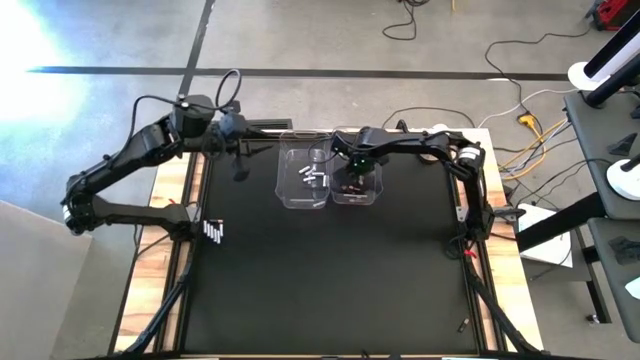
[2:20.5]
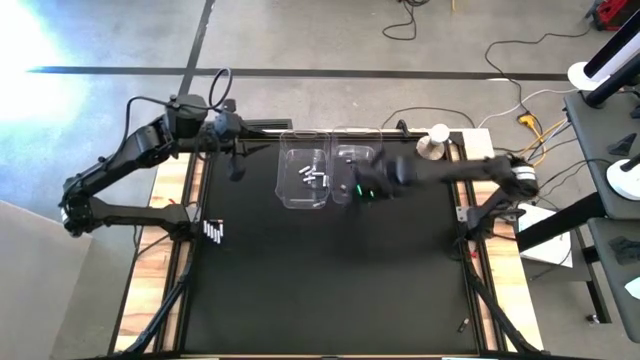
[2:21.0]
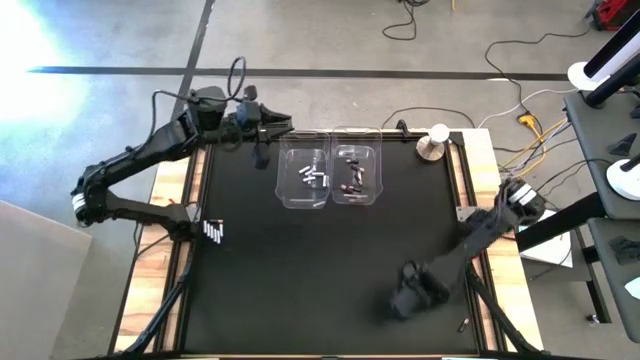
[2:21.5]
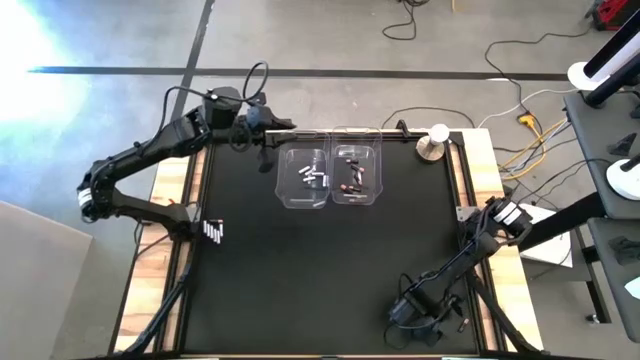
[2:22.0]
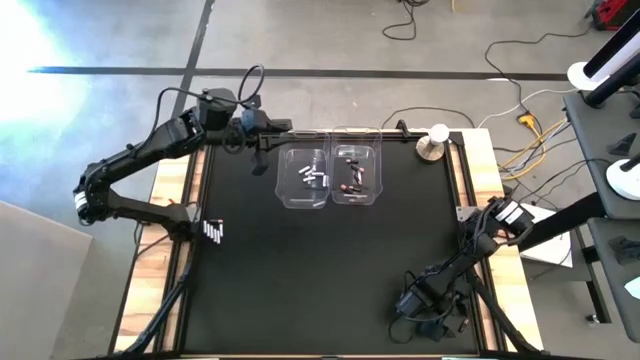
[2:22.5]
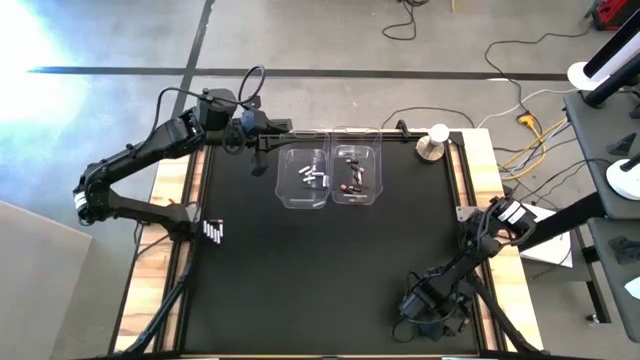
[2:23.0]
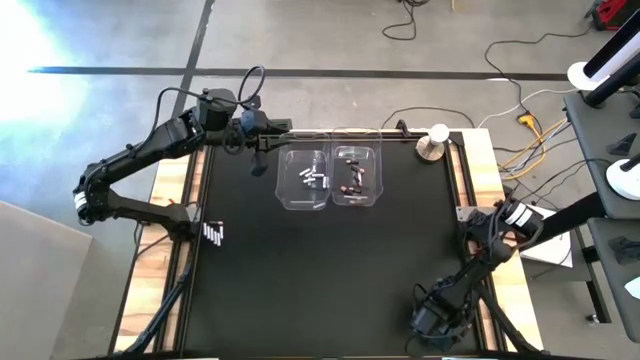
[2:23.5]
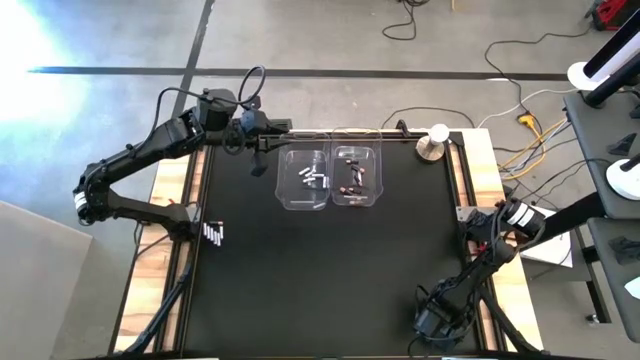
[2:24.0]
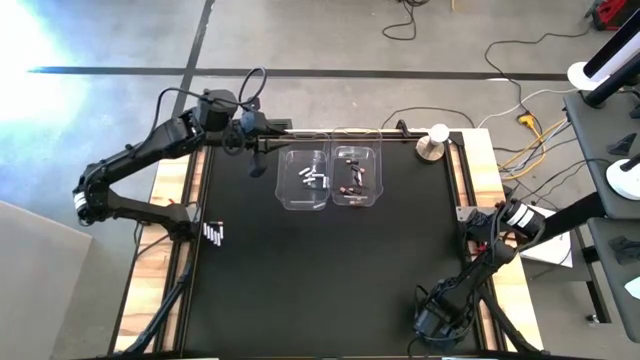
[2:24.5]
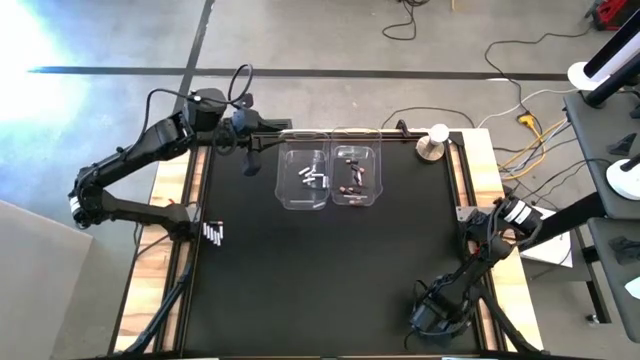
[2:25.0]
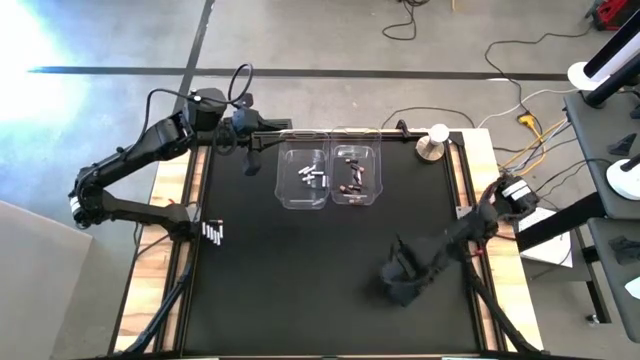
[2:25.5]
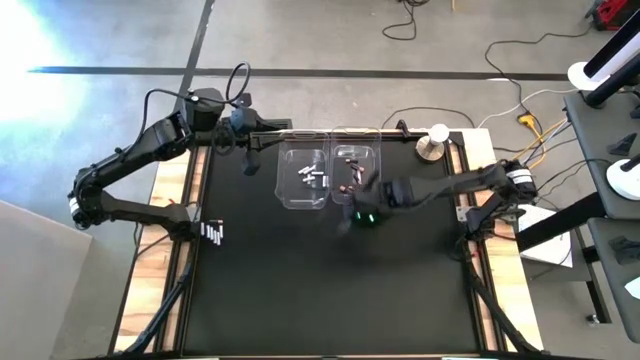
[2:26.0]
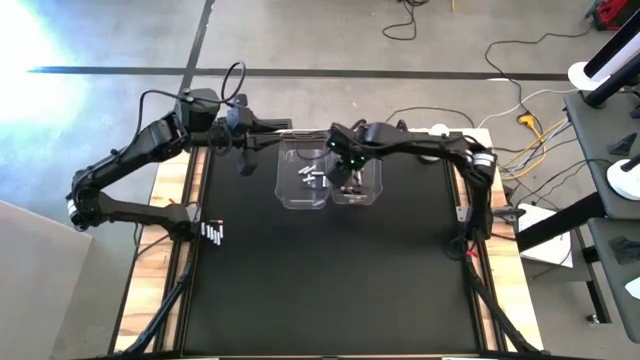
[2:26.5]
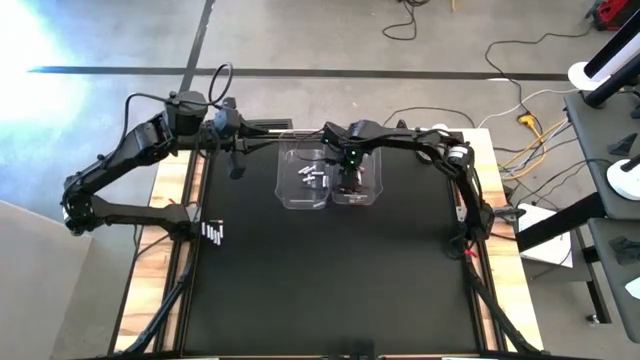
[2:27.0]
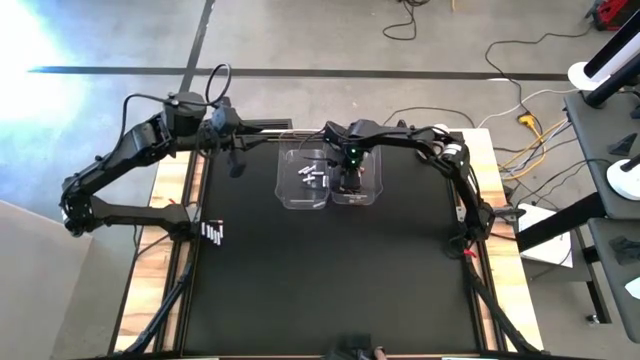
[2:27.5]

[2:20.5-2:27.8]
Task: Sort batteries
Put the black battery into the right transparent bin

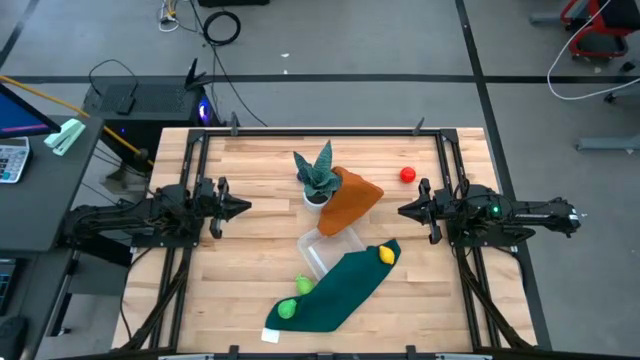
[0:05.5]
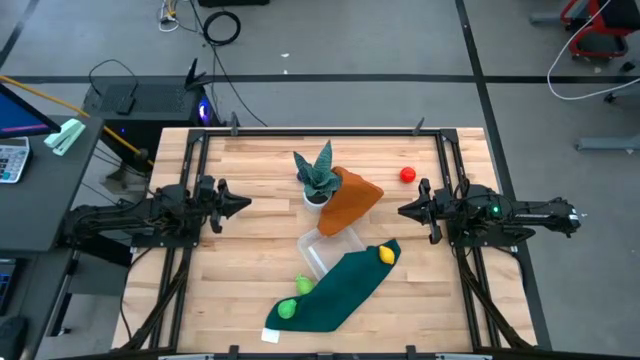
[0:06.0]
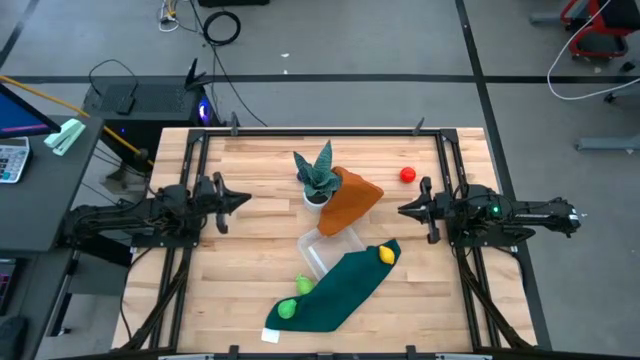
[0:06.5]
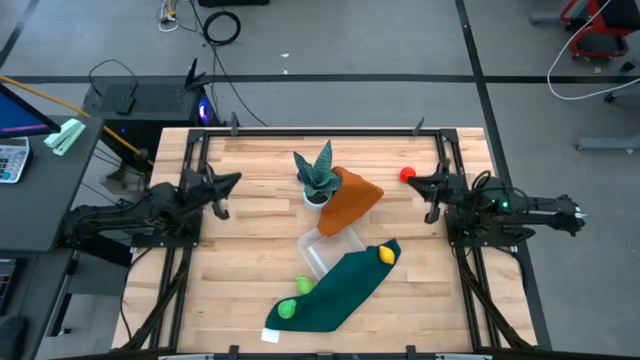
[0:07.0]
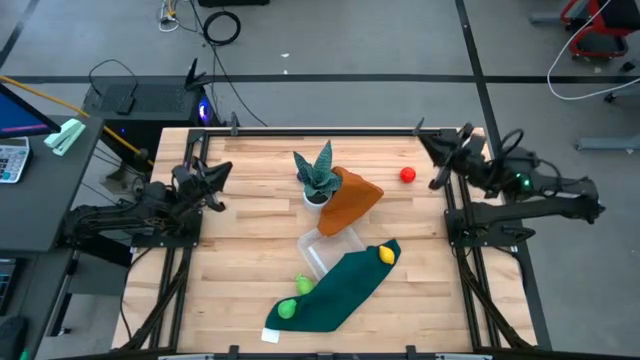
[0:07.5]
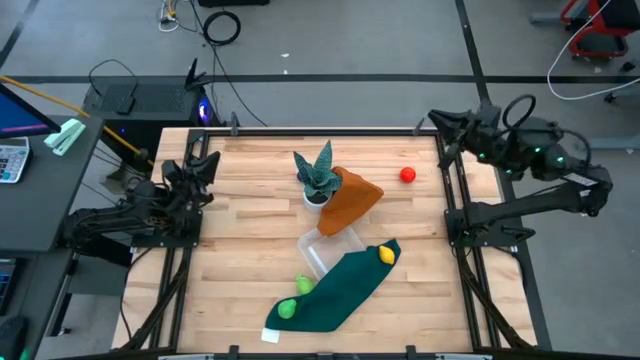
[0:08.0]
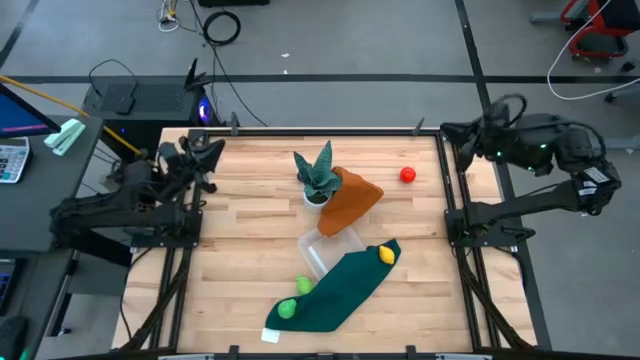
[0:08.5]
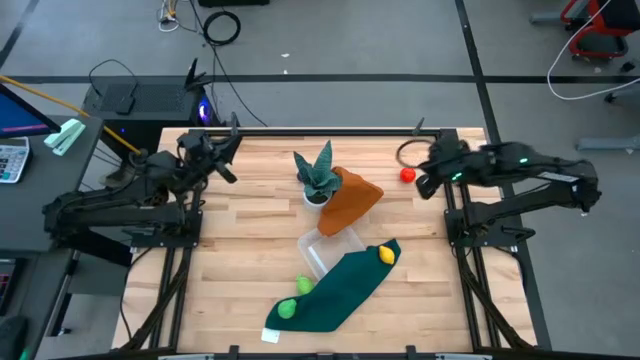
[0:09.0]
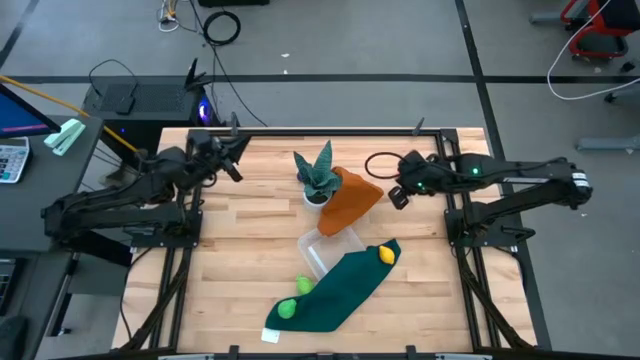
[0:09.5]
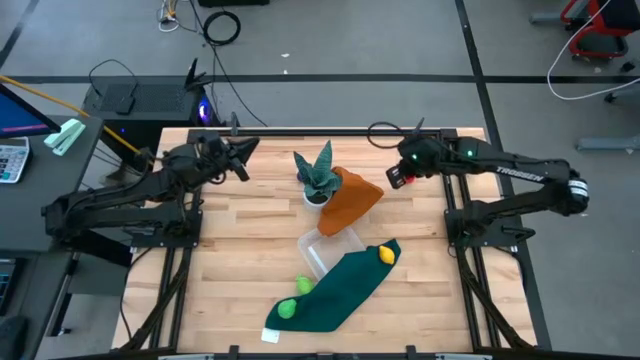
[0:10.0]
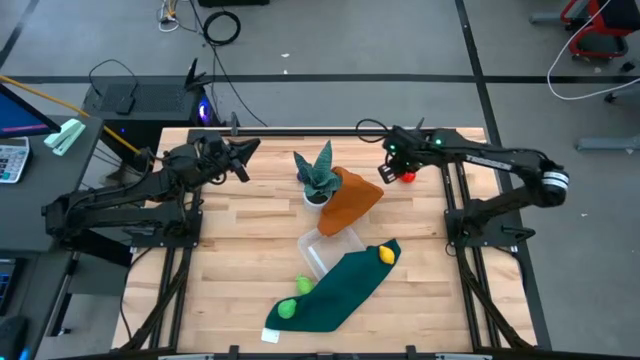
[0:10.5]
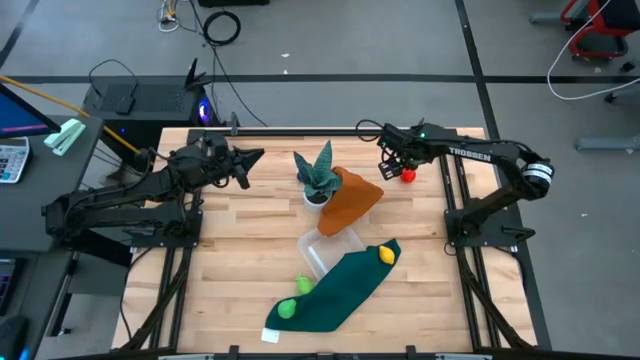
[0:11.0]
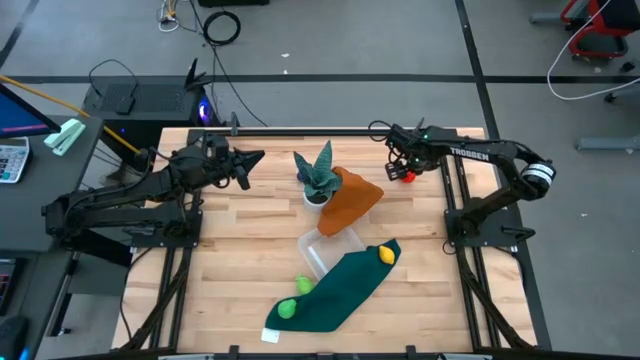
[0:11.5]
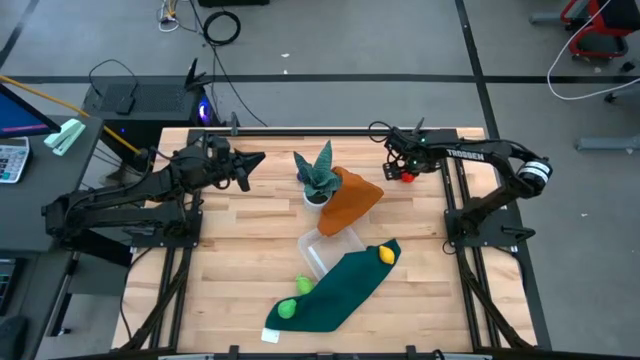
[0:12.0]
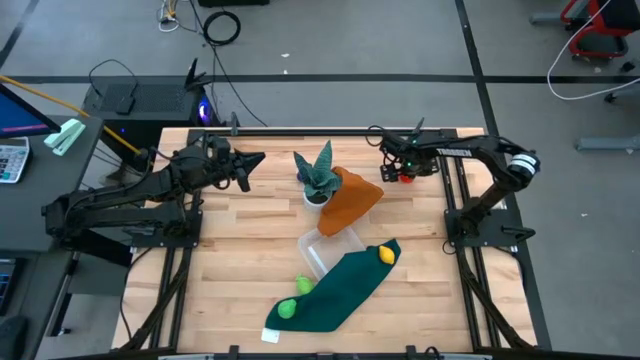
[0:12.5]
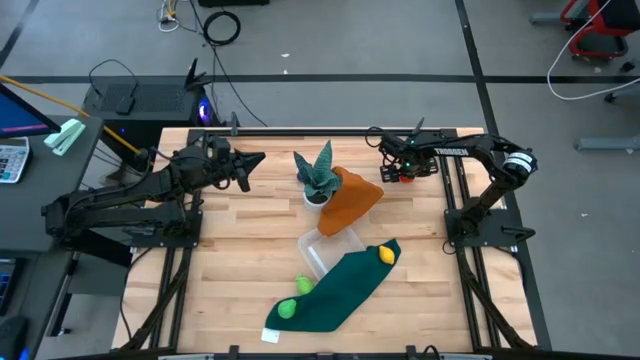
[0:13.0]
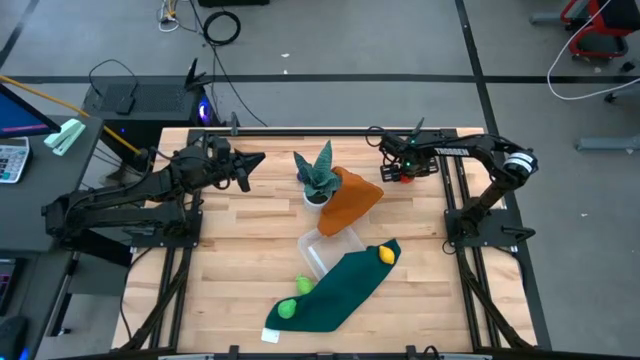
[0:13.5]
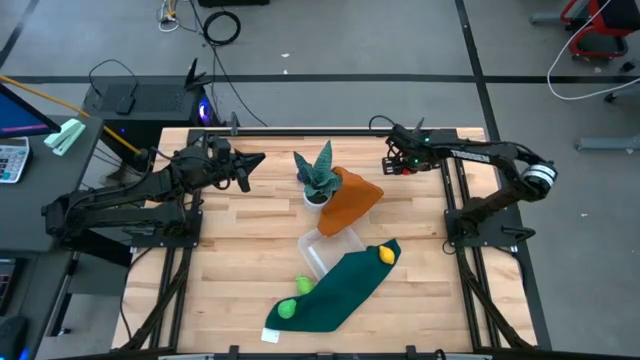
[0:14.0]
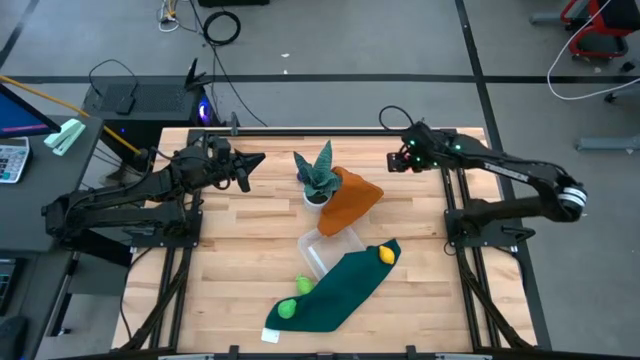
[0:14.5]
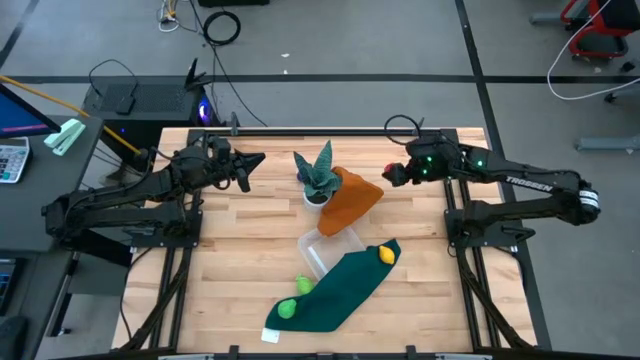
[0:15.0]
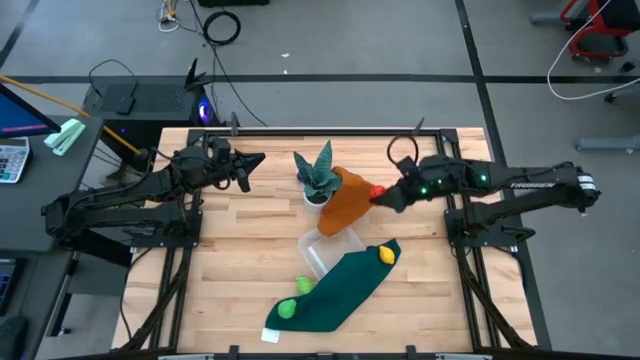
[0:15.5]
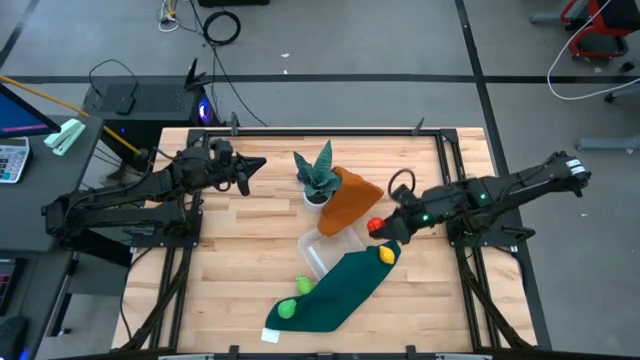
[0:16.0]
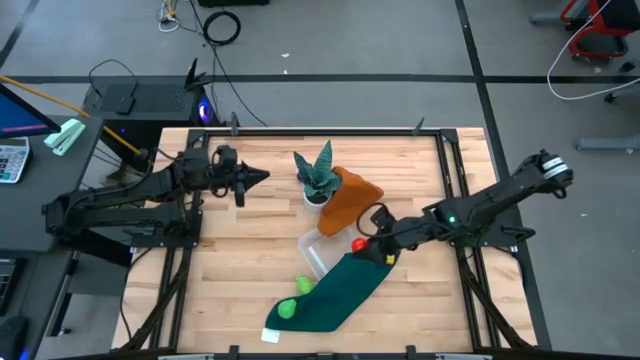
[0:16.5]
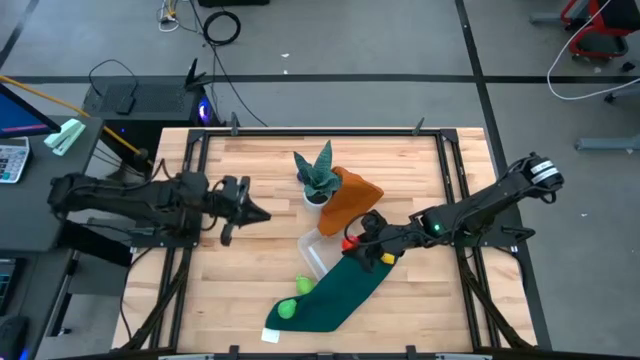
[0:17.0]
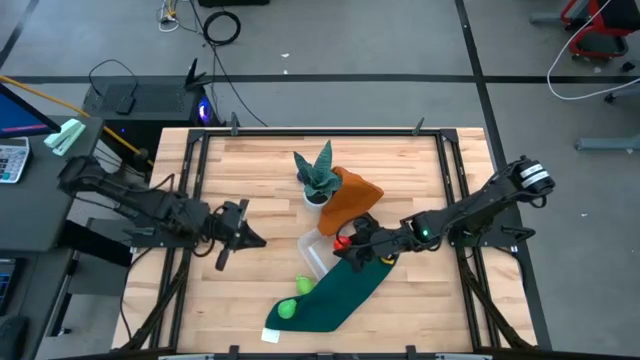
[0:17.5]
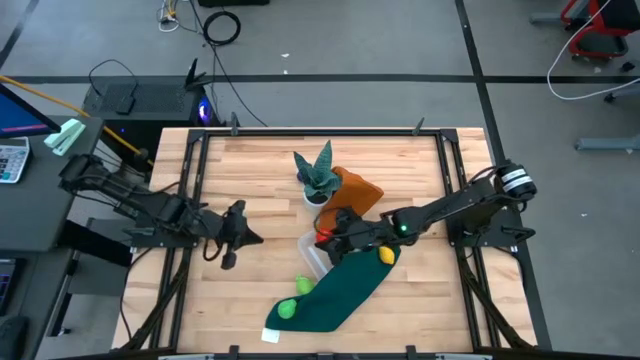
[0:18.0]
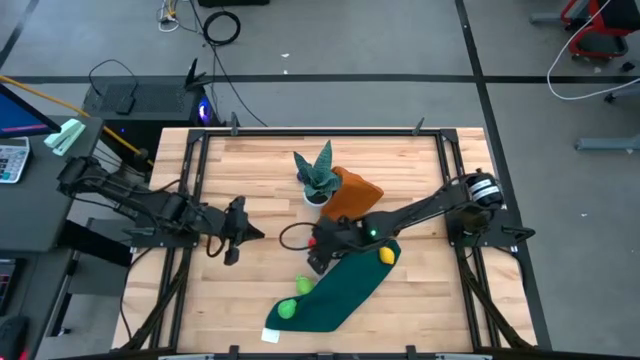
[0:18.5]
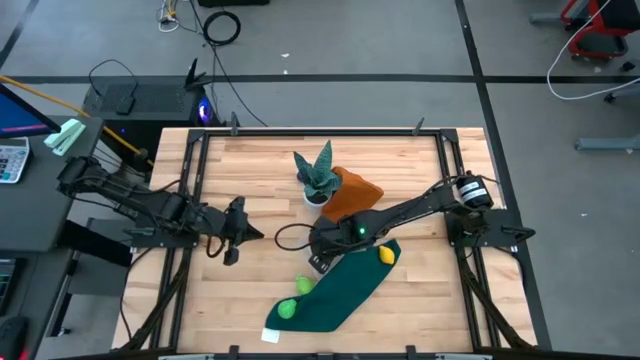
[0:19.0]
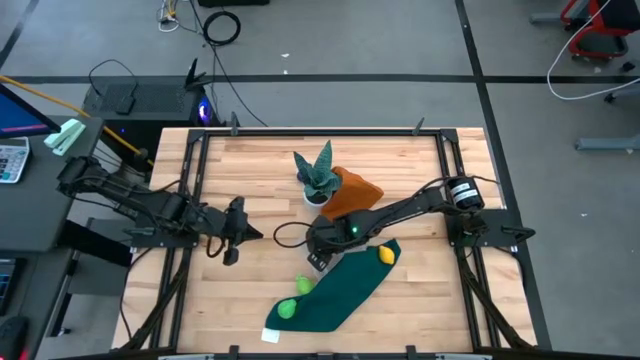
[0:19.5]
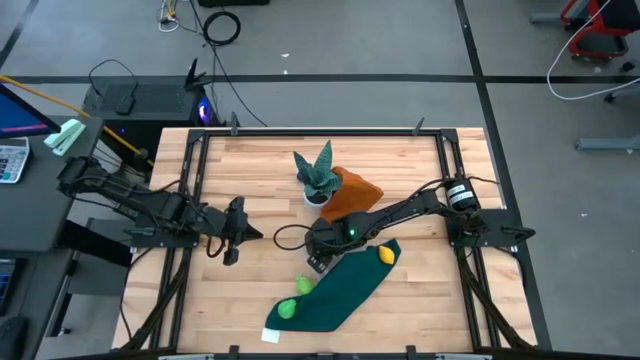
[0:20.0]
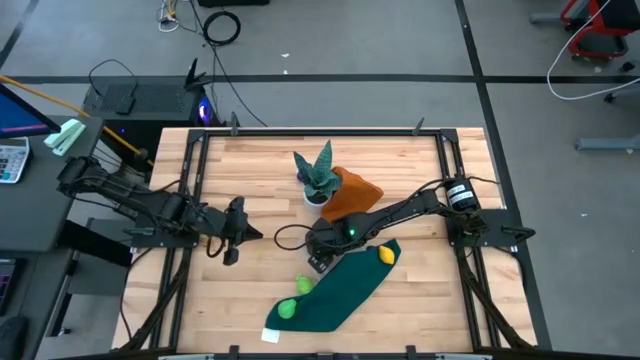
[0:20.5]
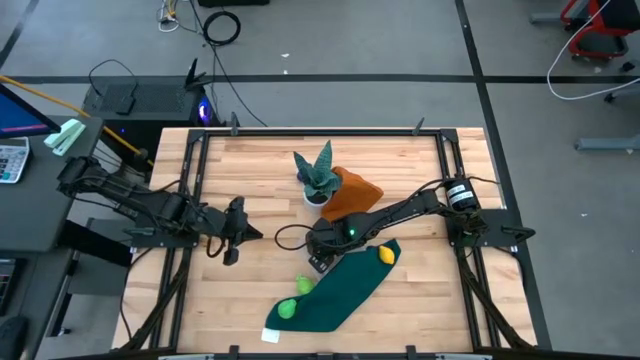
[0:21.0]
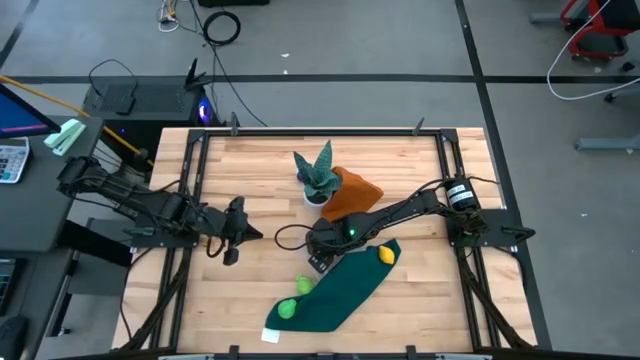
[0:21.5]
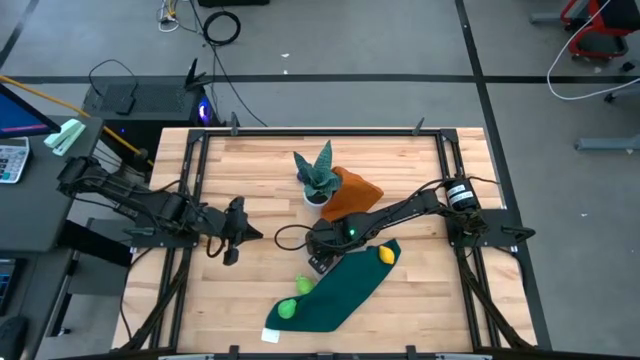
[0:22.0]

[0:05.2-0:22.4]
Task: Pick and placing Produce into tupperware
Put the red tomato into the transparent bin
